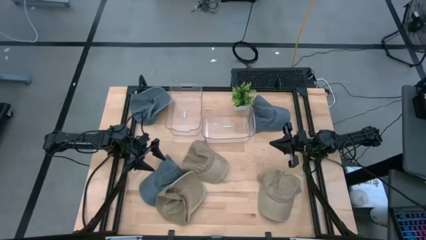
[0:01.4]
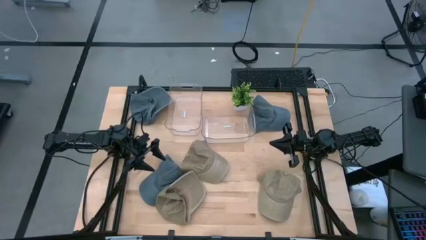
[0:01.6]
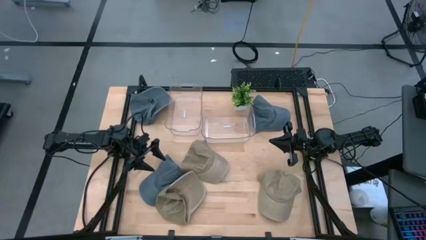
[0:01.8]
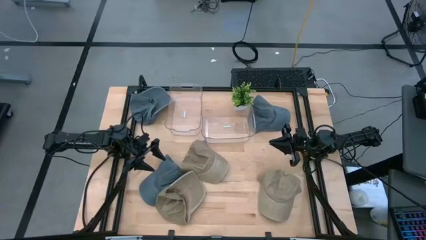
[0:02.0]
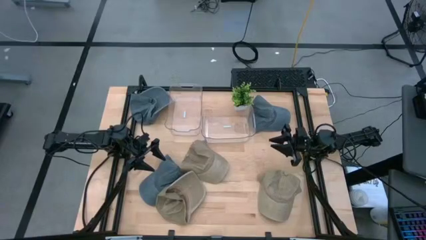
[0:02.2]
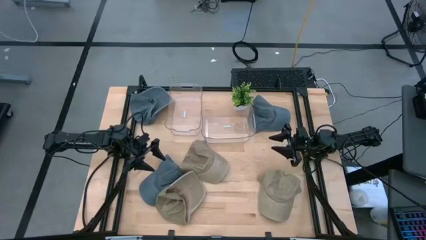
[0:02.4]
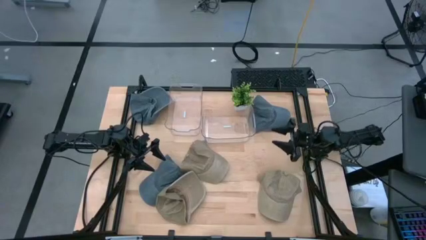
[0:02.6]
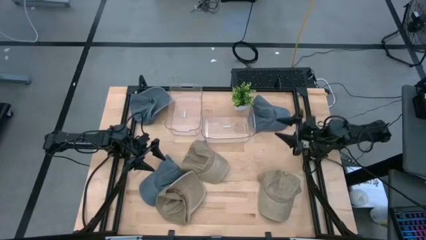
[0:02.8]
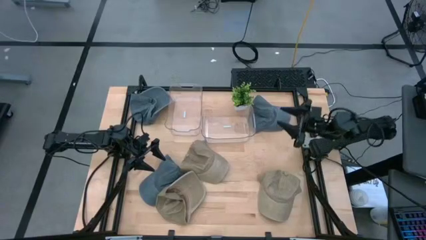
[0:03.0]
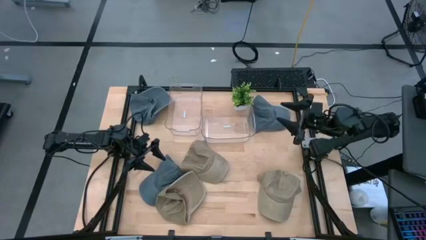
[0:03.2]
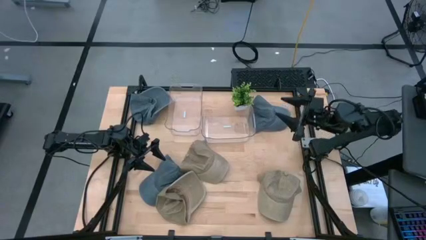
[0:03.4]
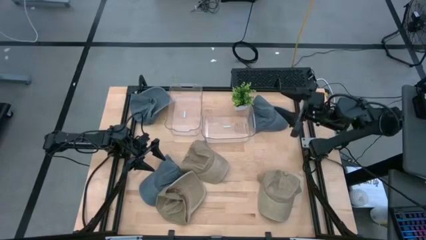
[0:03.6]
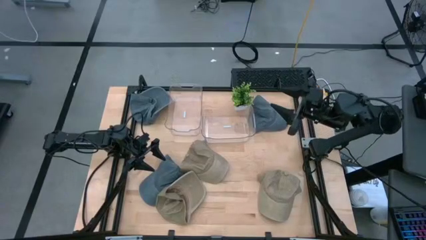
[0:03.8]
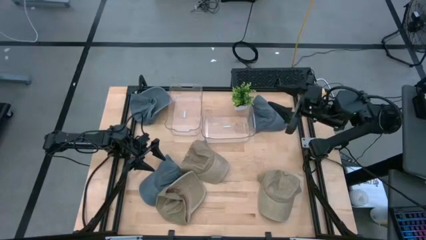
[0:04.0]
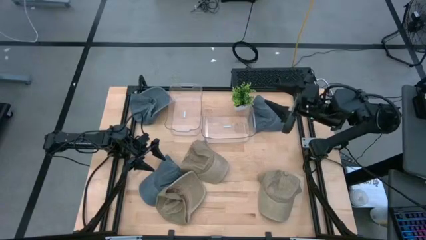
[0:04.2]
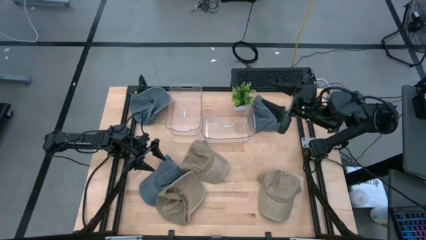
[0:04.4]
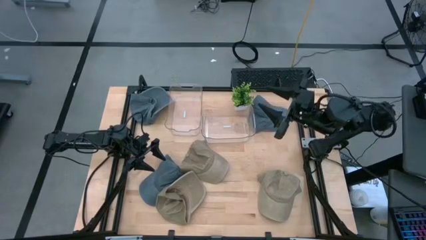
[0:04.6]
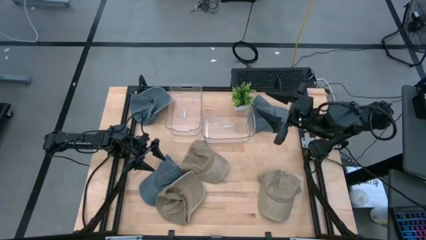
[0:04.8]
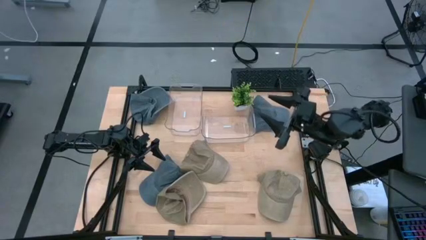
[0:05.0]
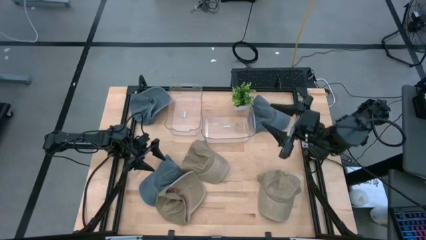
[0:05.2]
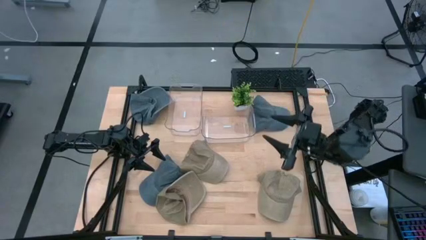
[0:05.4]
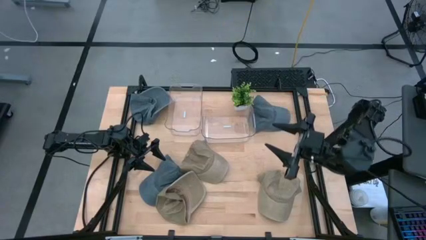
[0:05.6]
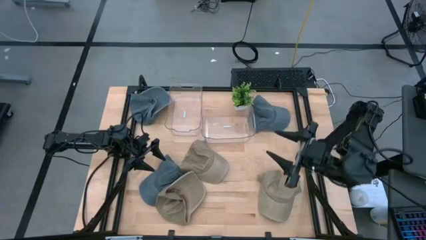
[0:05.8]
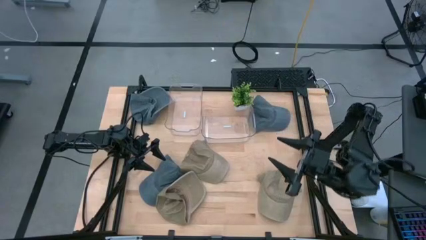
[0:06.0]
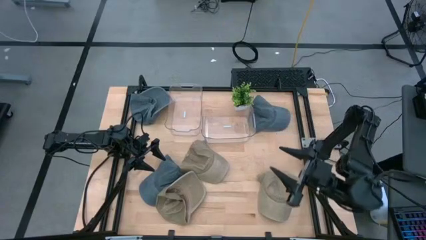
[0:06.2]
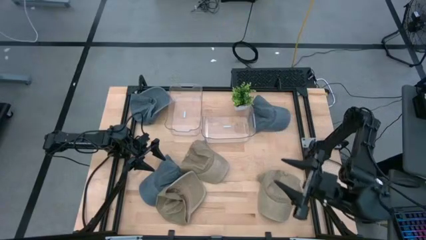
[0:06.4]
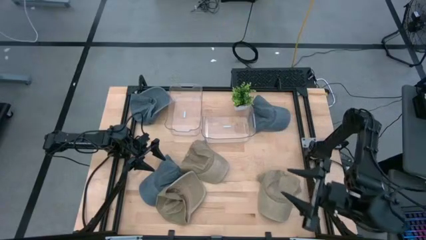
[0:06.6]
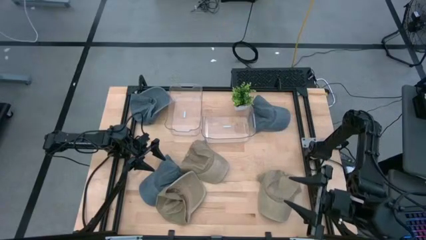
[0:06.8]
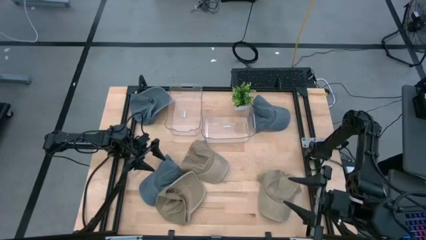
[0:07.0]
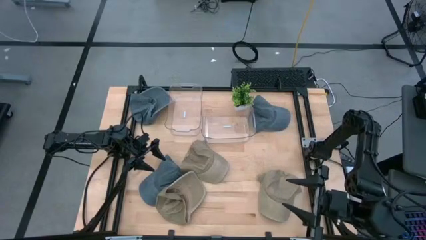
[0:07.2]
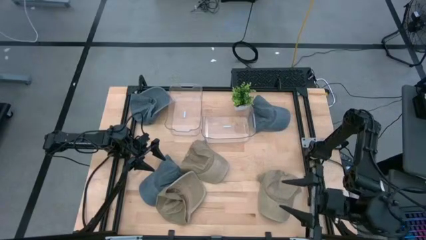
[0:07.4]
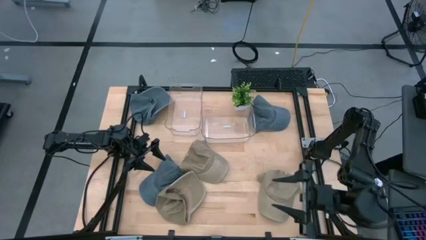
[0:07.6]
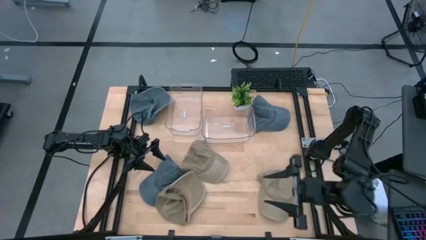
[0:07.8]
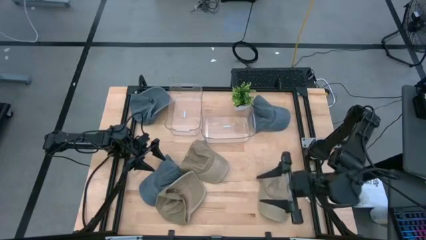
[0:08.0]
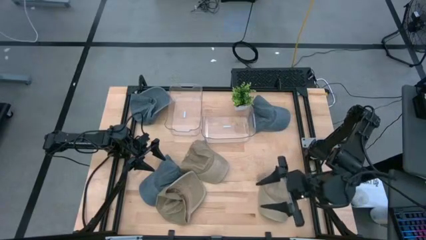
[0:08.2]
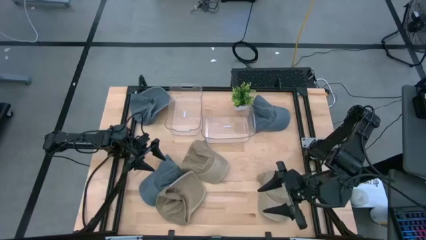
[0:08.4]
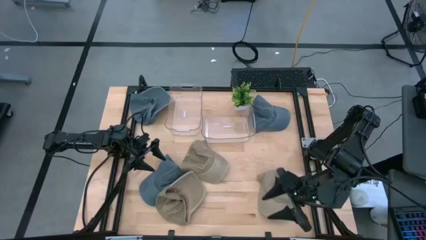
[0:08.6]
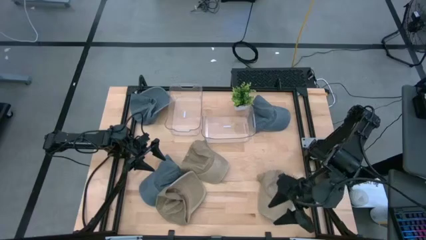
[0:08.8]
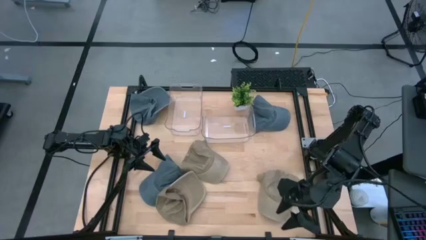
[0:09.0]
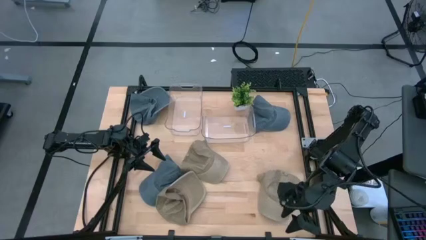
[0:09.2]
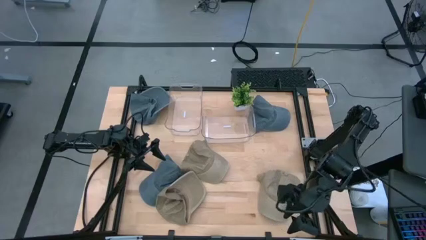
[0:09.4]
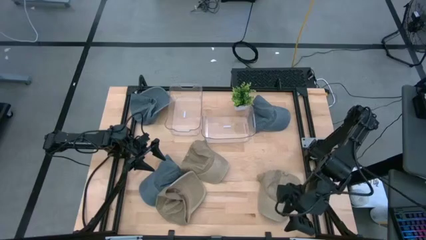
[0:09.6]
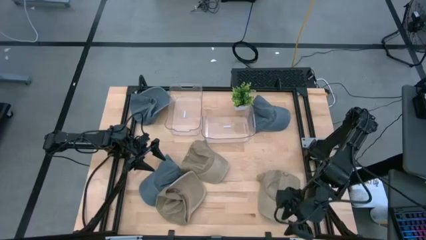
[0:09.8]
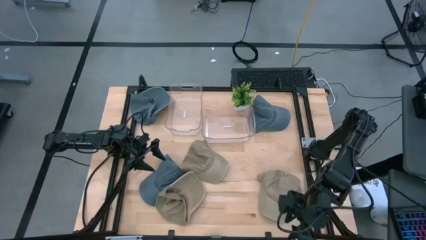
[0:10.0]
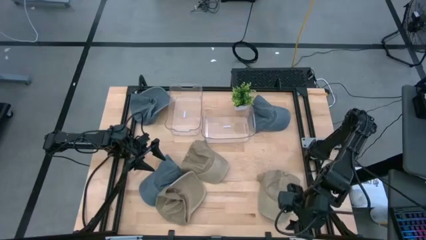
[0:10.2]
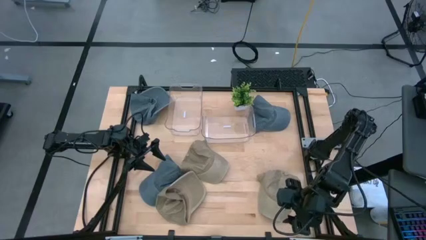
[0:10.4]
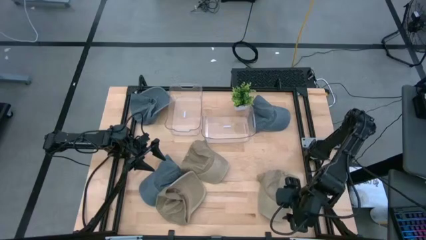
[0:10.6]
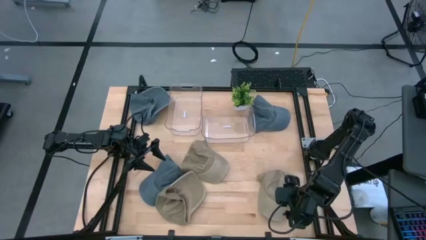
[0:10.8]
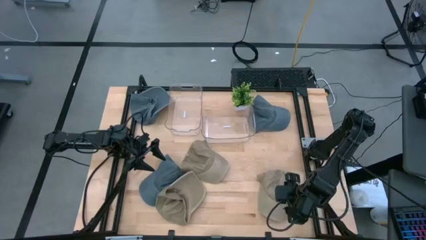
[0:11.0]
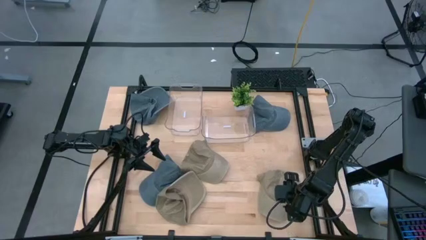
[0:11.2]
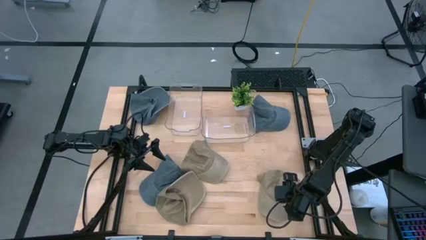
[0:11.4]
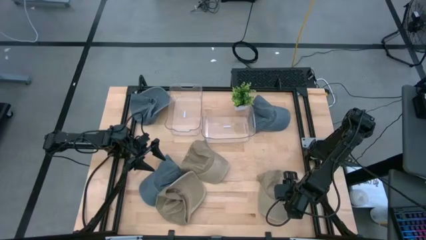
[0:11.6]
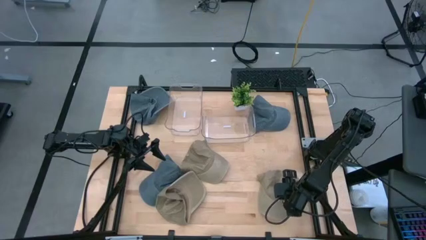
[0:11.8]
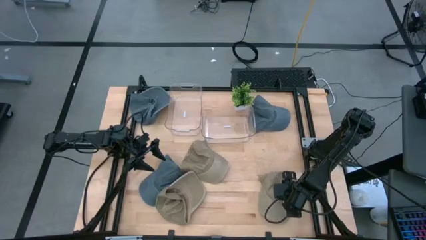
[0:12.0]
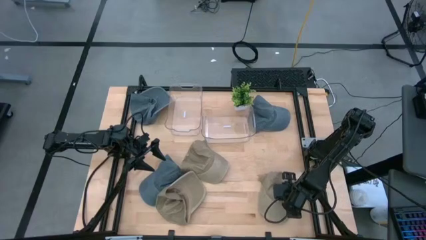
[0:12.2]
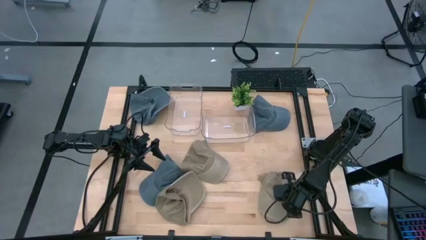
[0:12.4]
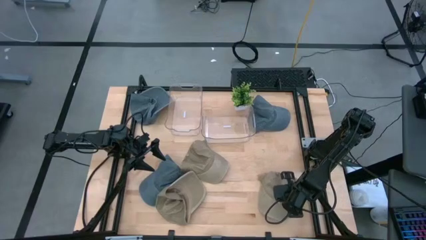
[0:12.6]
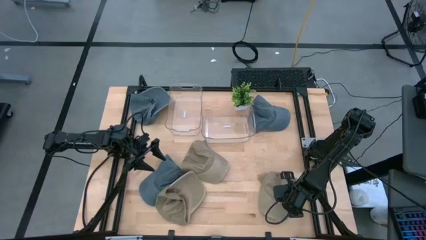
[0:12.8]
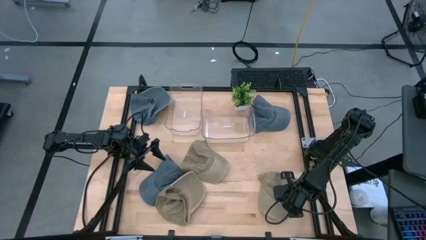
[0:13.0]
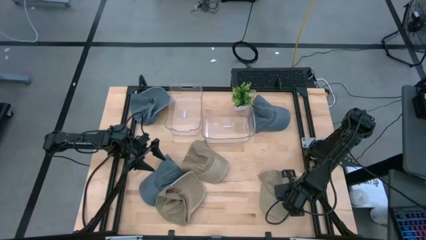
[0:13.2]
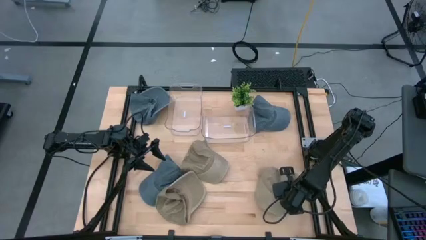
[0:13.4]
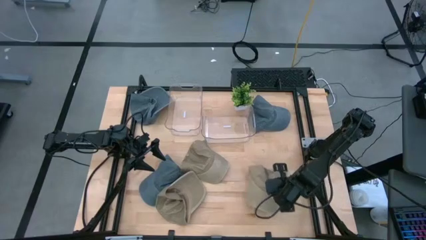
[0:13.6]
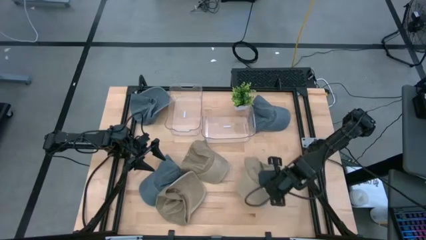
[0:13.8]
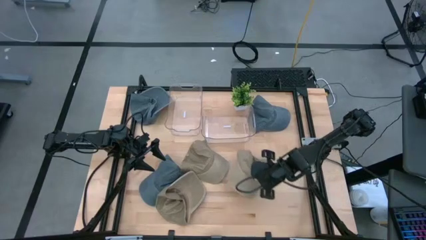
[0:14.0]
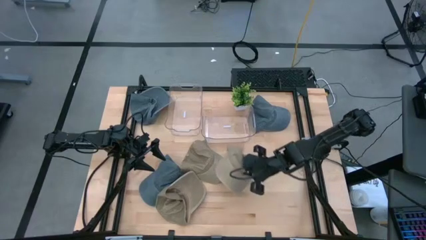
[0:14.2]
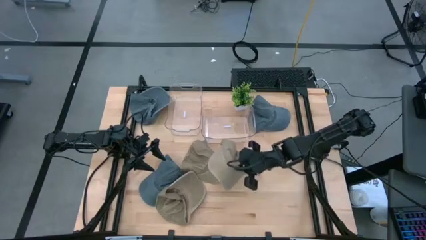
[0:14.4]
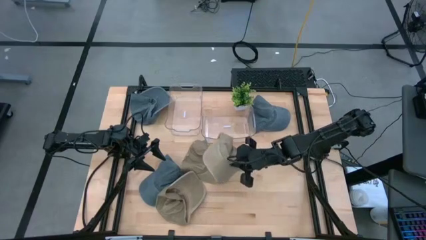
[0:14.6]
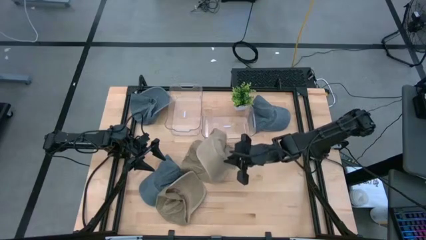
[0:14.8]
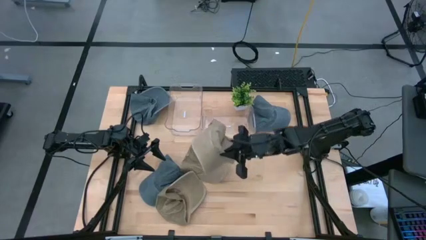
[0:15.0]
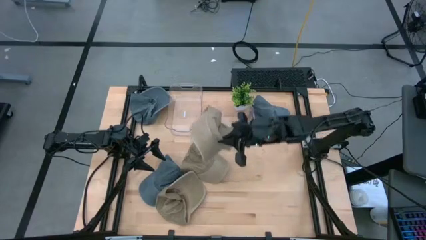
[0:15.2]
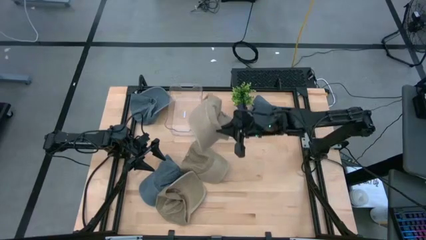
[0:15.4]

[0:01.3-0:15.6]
Task: Pick & Place hat
Put the right brown cap into the right transparent bin
